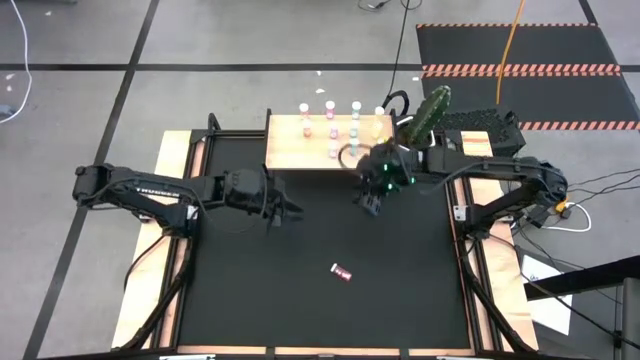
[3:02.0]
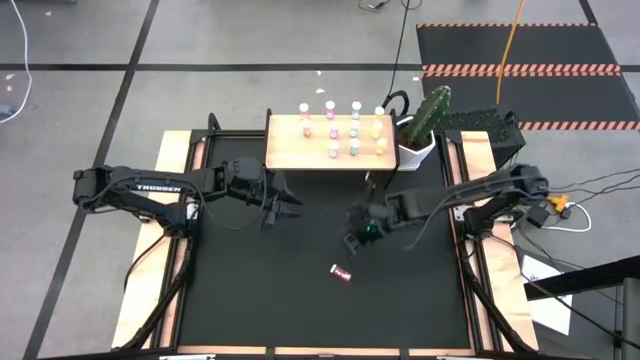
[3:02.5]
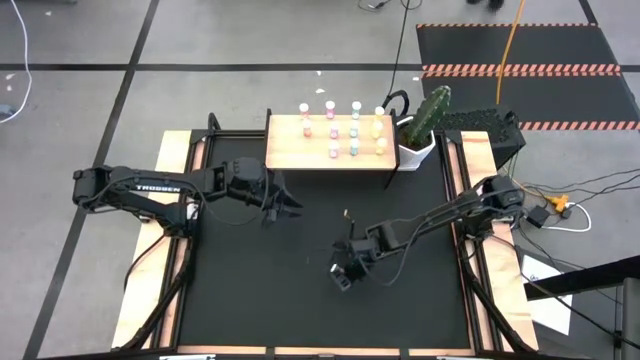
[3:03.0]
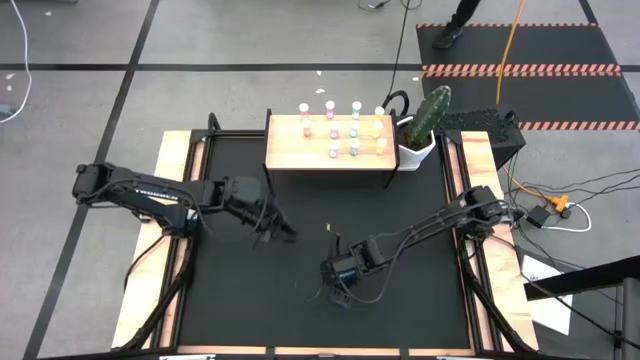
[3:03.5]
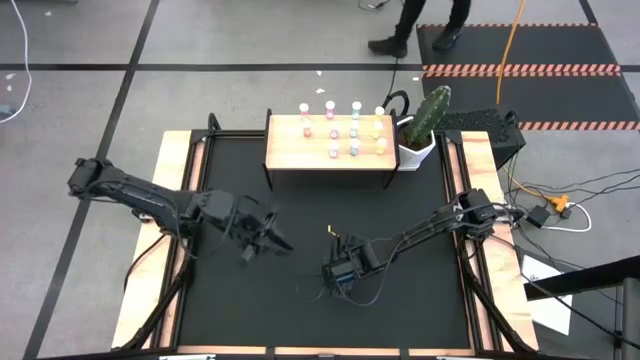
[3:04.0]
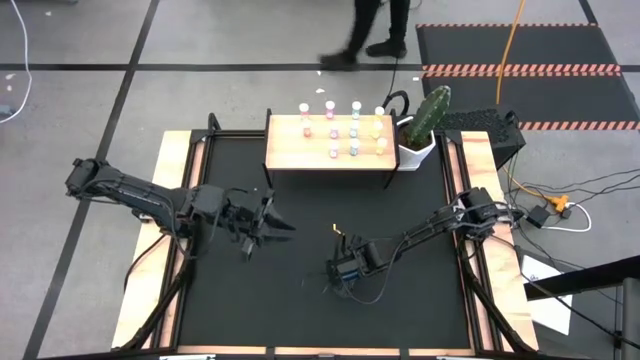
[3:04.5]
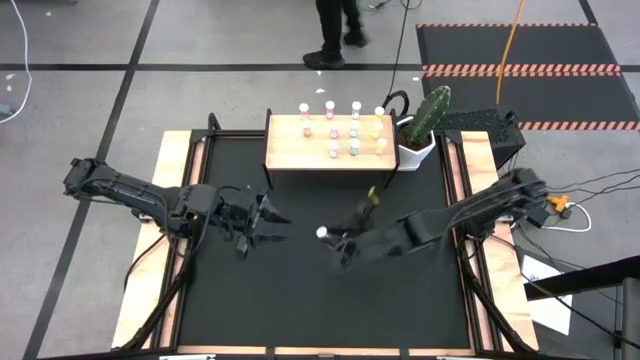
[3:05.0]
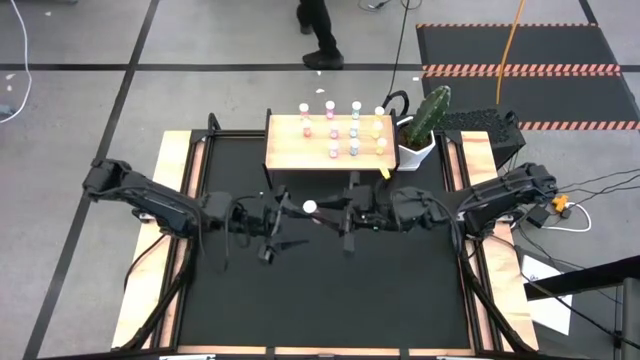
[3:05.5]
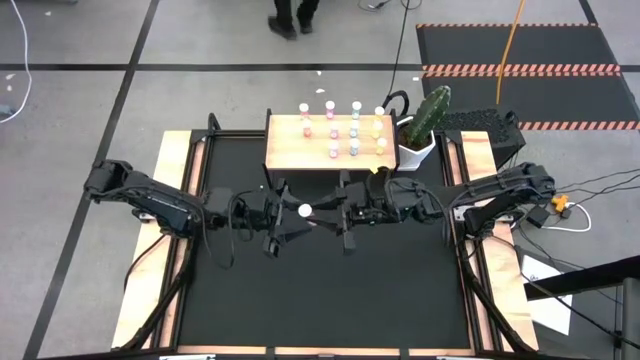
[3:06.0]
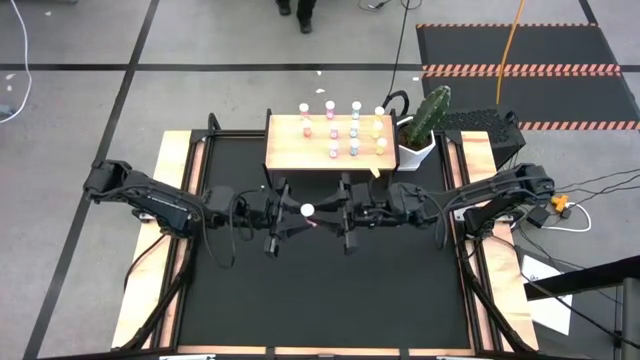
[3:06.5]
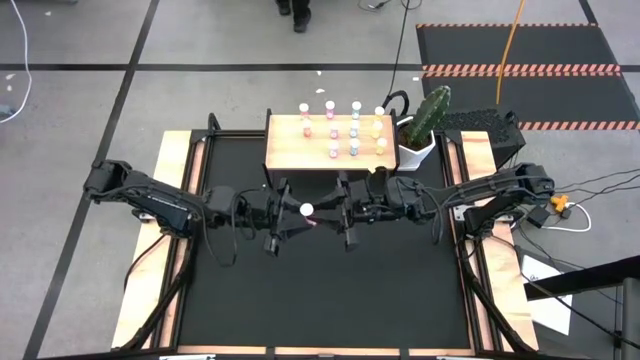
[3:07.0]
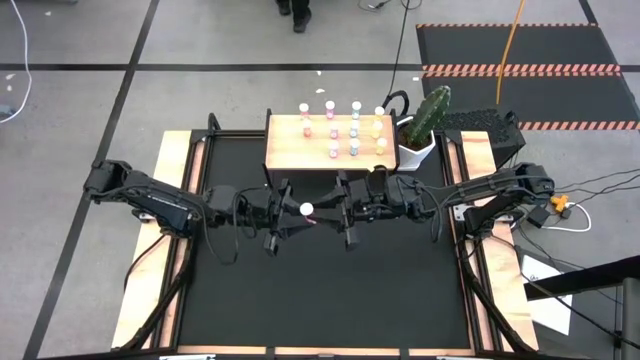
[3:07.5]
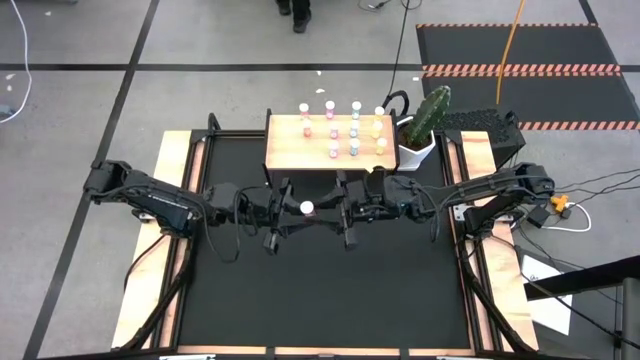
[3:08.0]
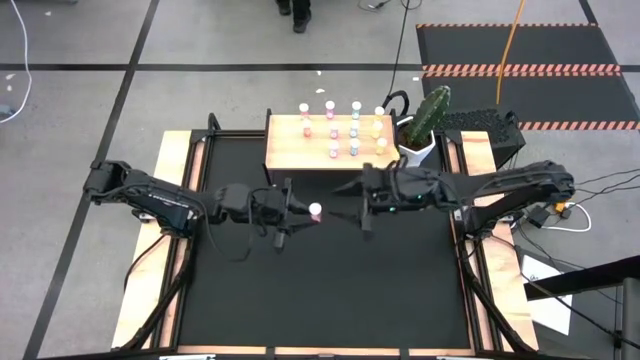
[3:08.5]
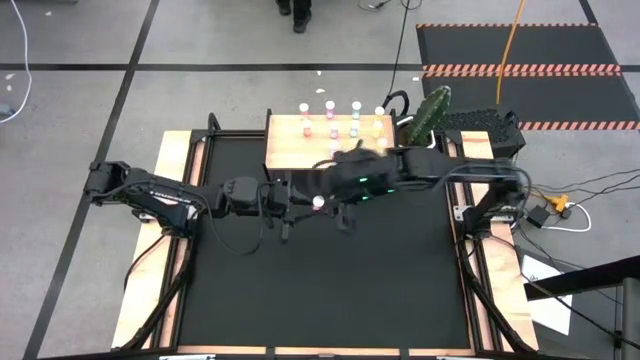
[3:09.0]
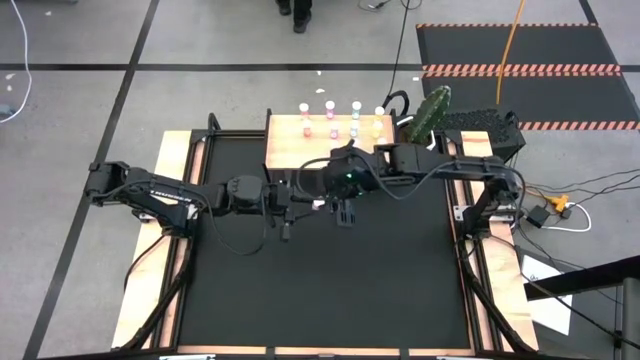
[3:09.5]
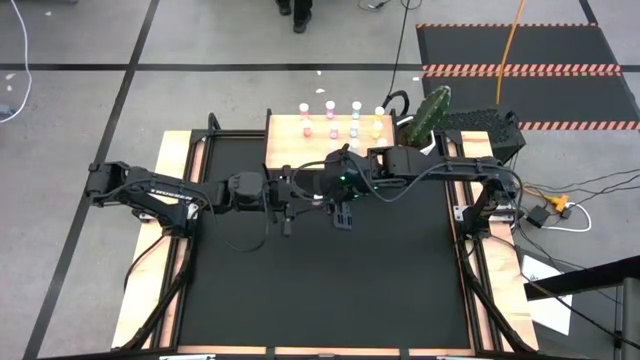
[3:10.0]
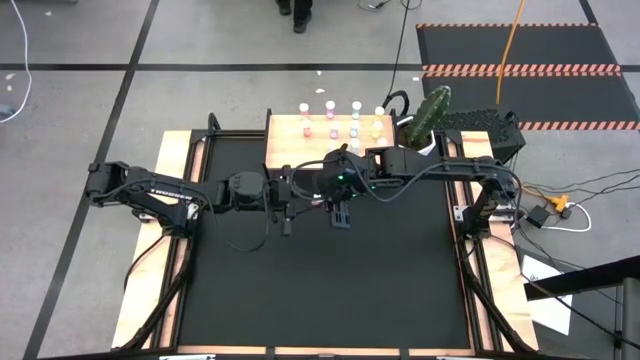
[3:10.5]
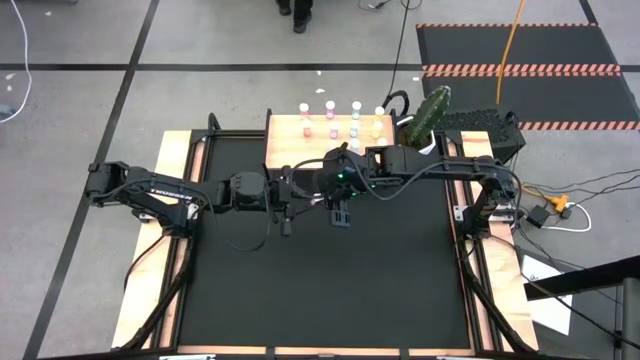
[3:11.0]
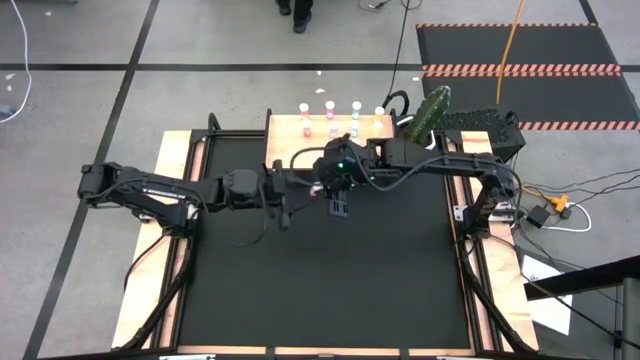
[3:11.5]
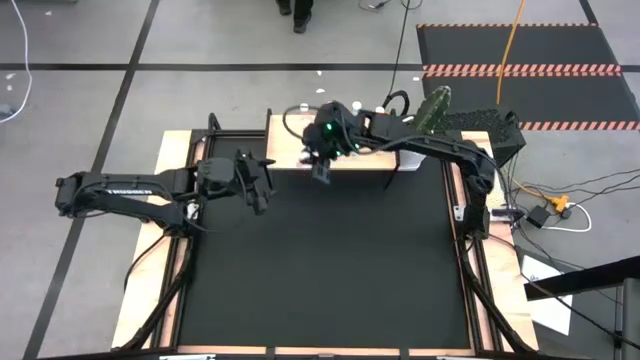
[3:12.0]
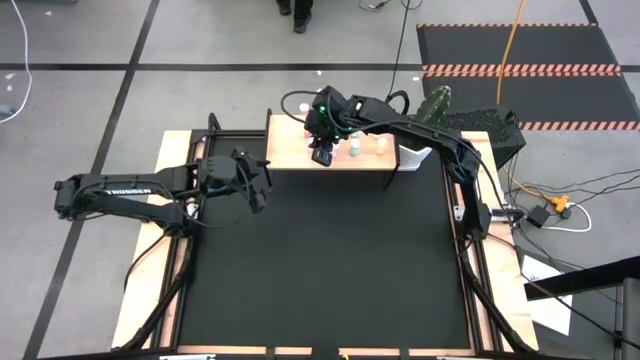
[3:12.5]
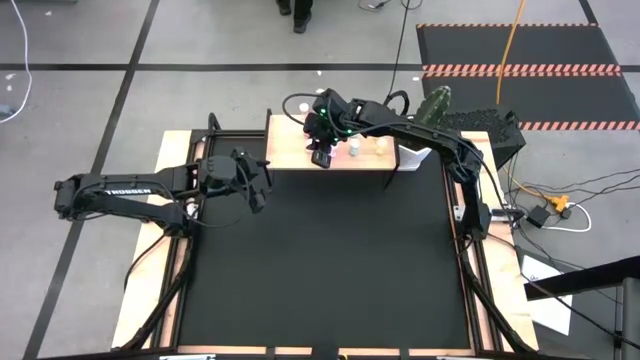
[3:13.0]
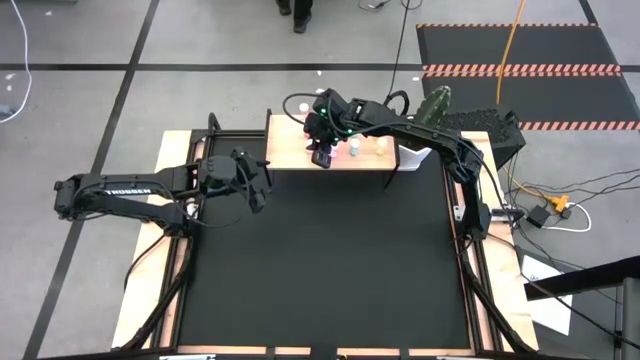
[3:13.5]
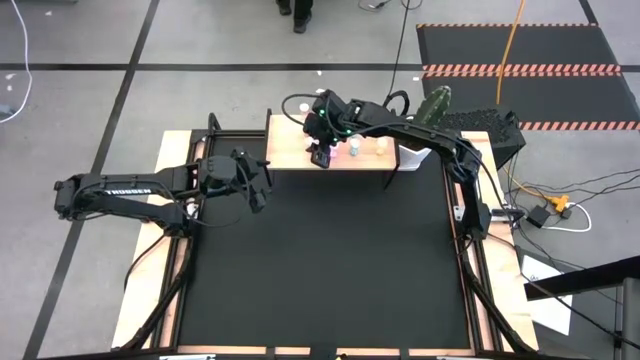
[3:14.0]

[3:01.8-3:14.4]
Task: Pick and place medicine bottles onto shelf by color
Put the red pill bottle on the shelf aligned with the other red pill bottles

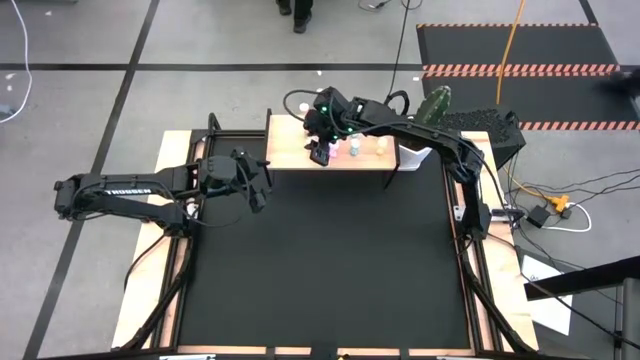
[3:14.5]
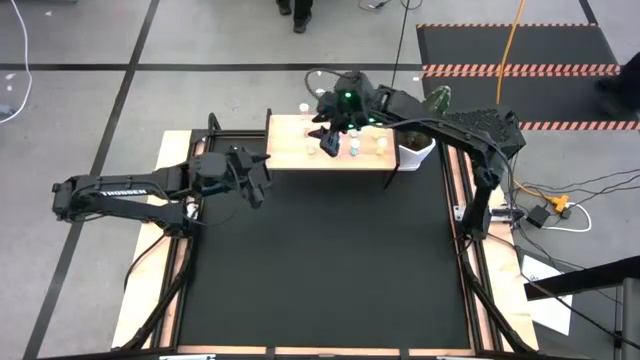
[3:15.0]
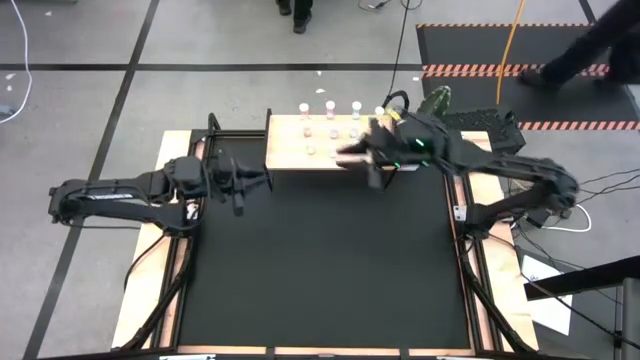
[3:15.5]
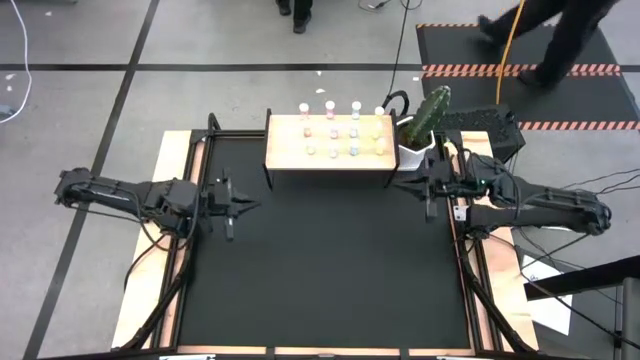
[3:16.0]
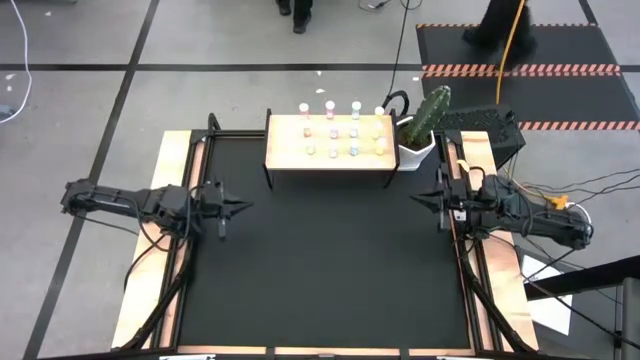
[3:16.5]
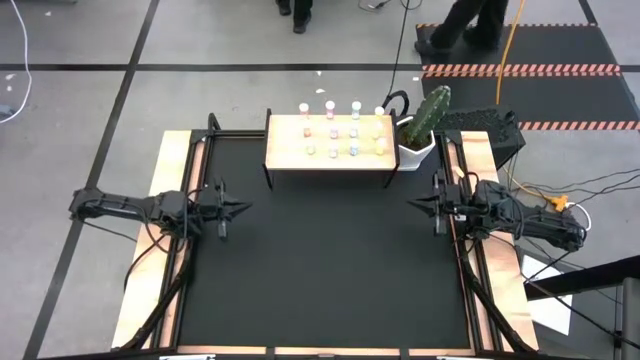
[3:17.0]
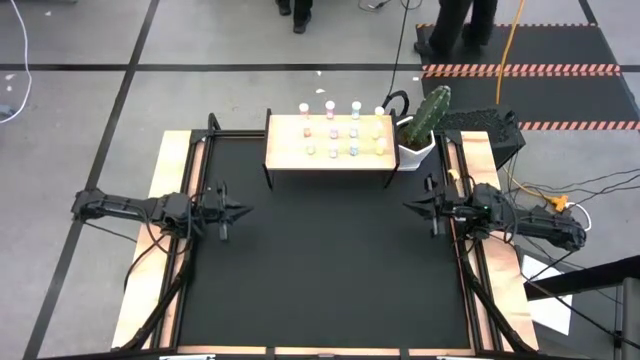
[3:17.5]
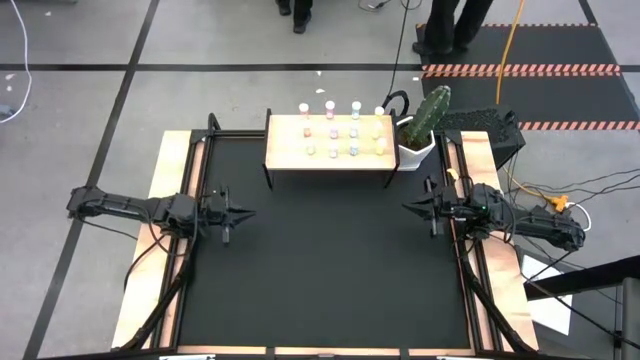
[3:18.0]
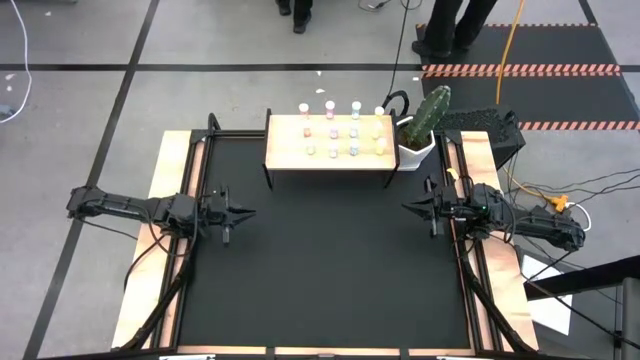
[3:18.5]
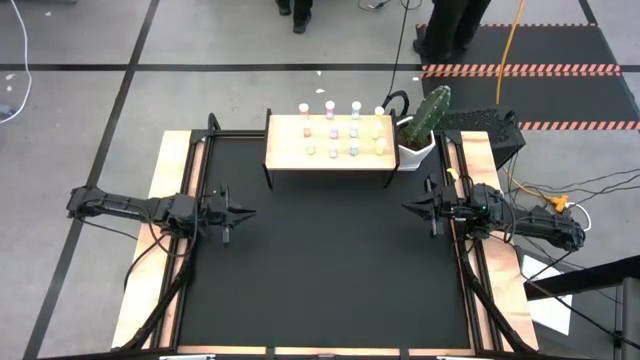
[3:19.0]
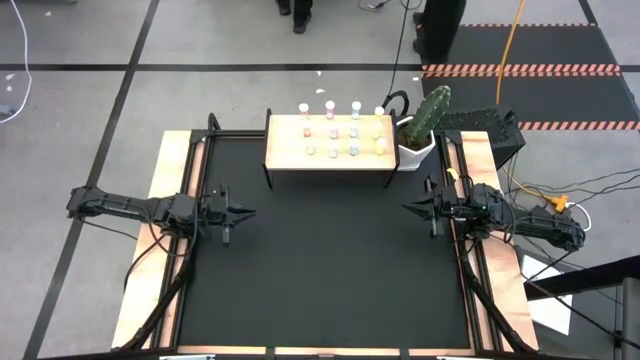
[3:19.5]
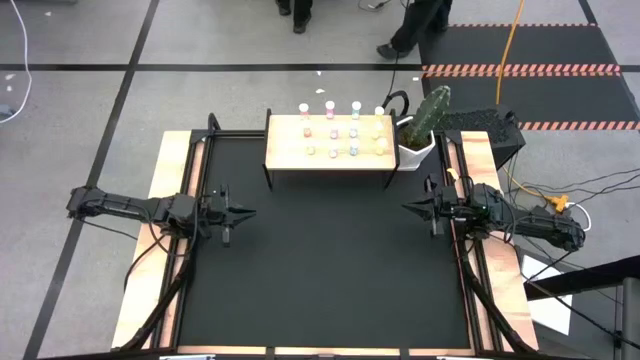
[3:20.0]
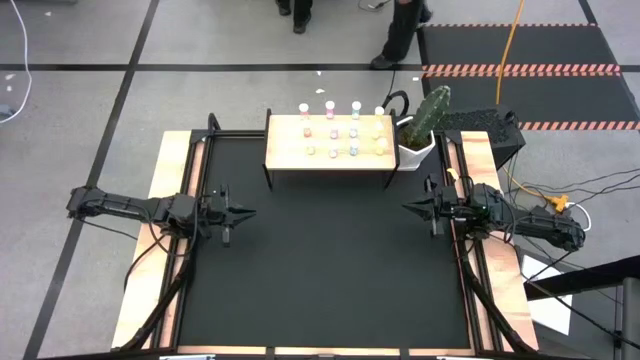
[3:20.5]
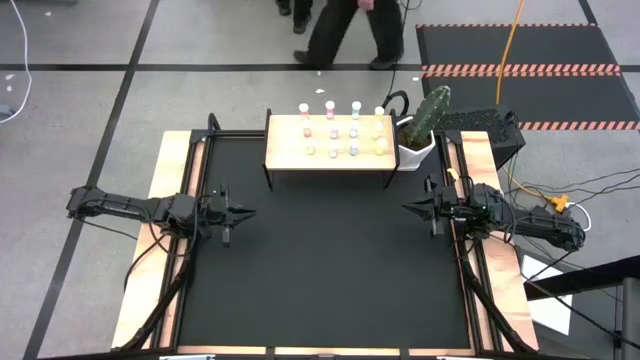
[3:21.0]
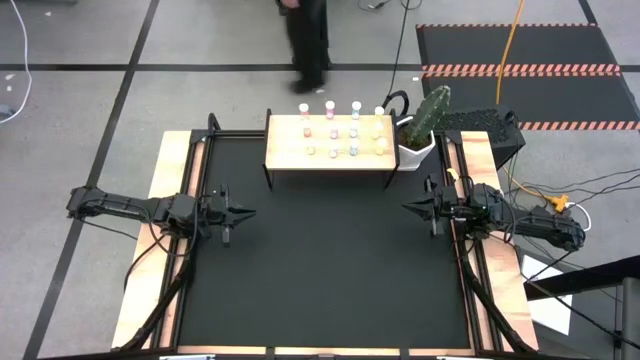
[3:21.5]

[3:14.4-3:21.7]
Return to Home Position

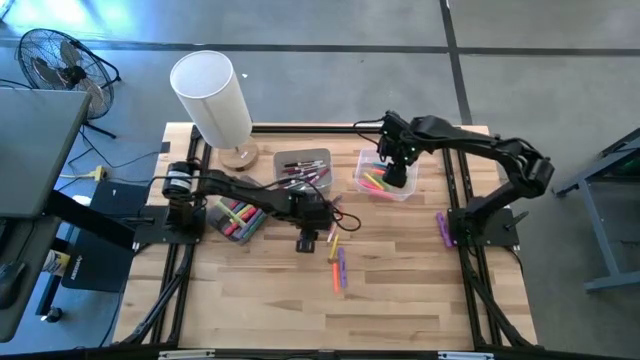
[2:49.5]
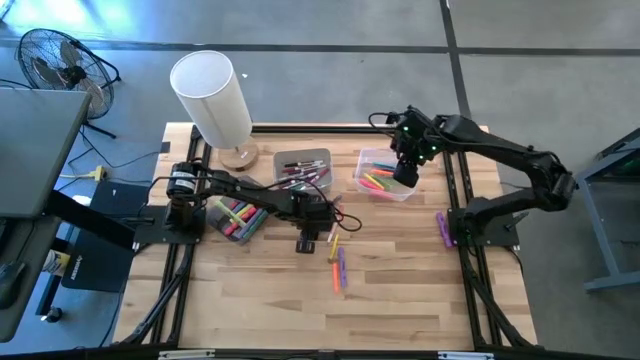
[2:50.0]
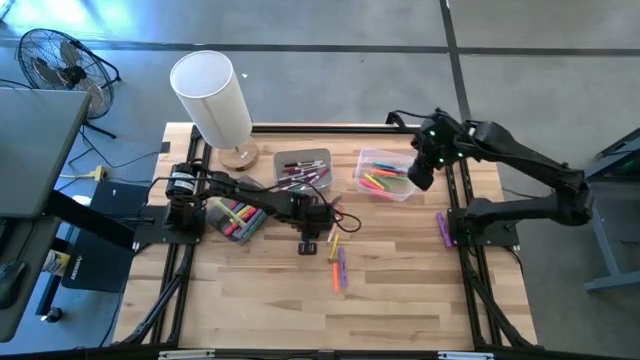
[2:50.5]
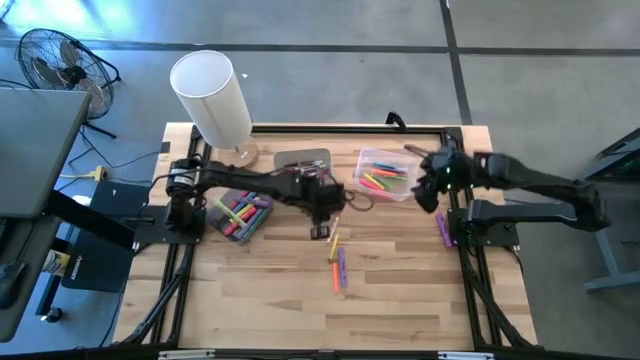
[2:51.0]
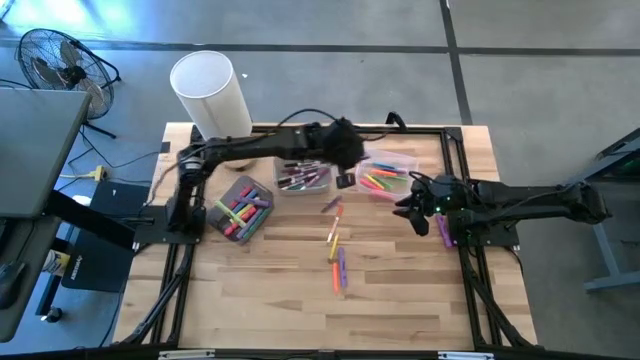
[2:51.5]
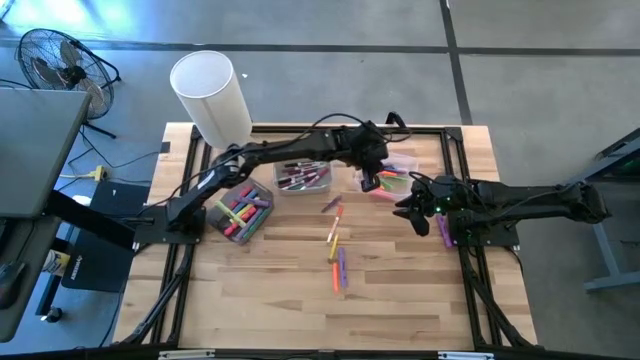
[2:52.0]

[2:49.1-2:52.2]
Task: Pick & Place Markers
Put the purple pen into the transparent bin
